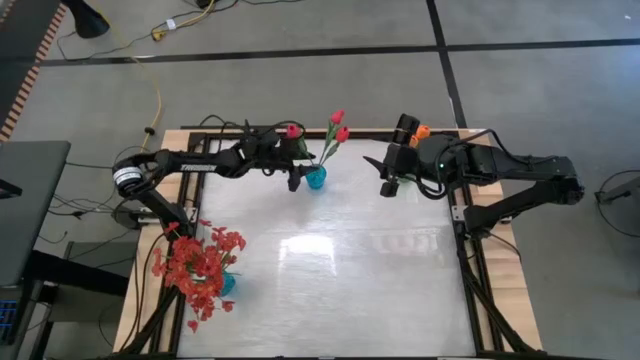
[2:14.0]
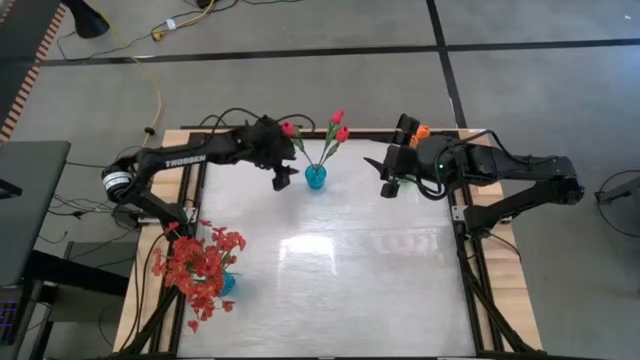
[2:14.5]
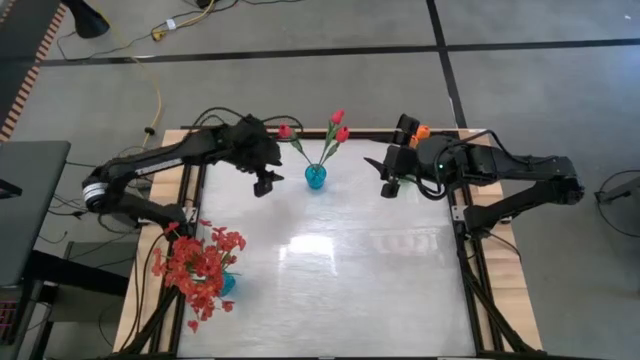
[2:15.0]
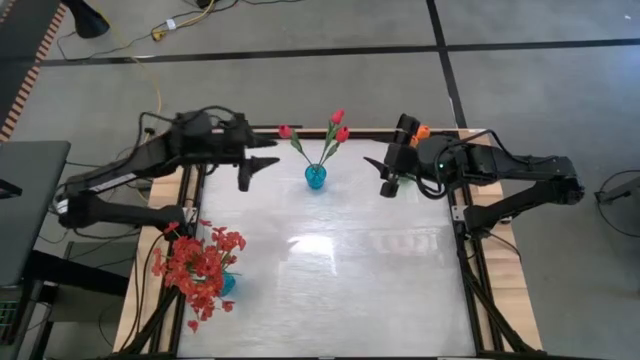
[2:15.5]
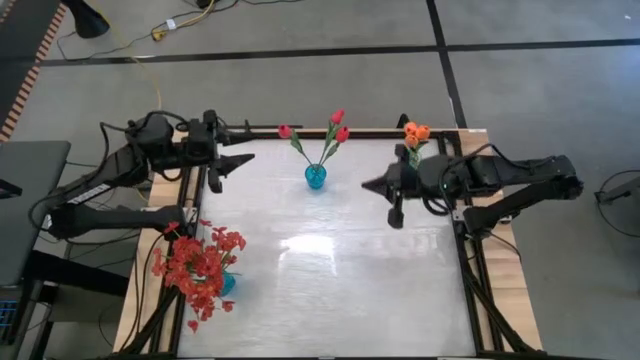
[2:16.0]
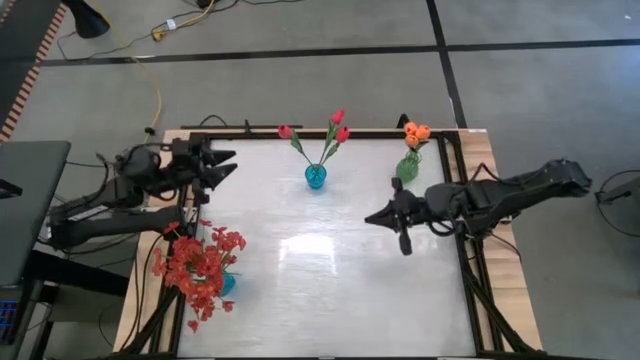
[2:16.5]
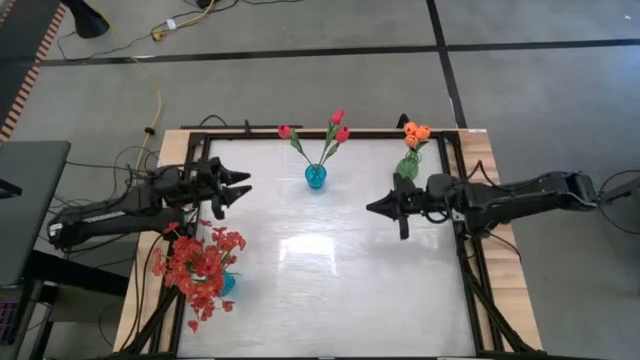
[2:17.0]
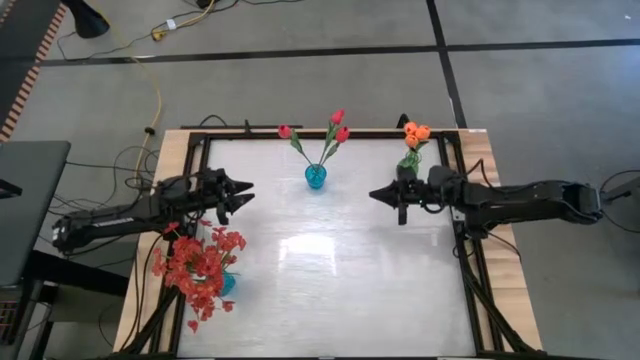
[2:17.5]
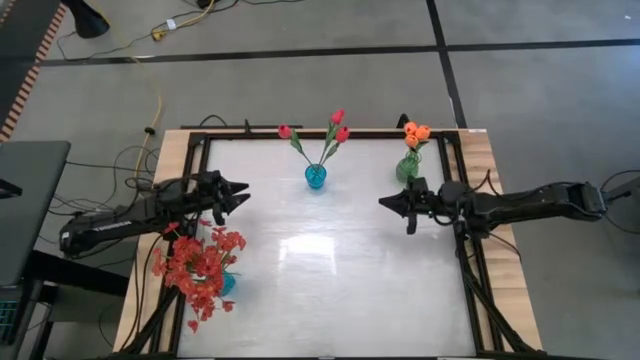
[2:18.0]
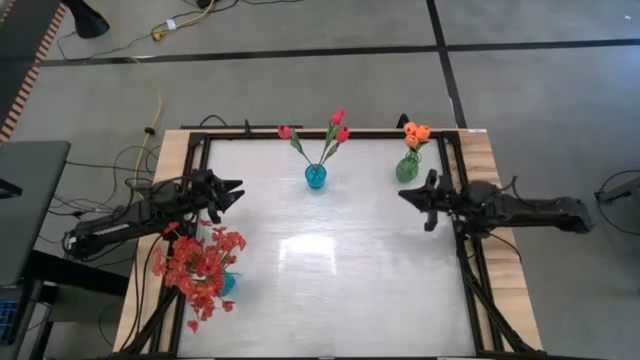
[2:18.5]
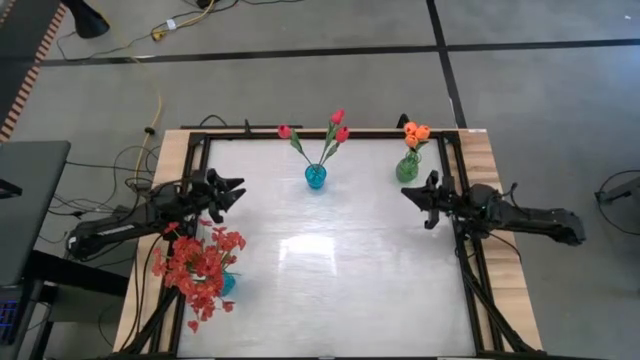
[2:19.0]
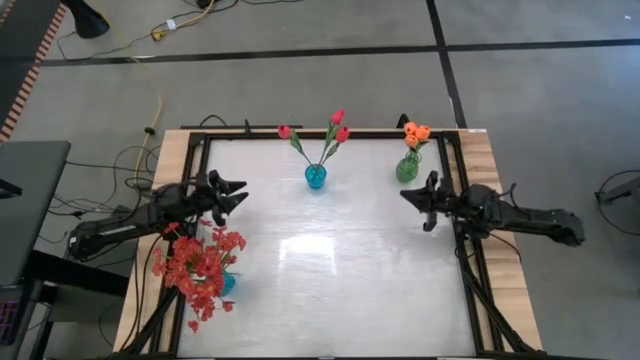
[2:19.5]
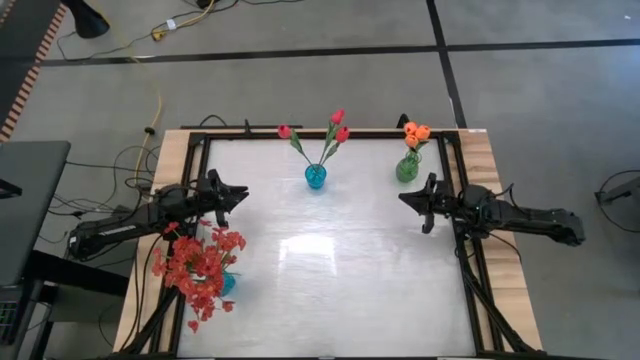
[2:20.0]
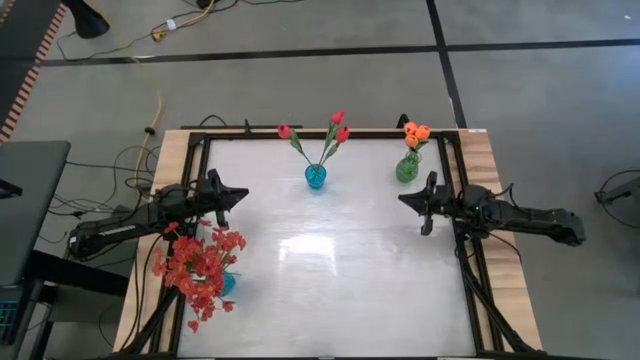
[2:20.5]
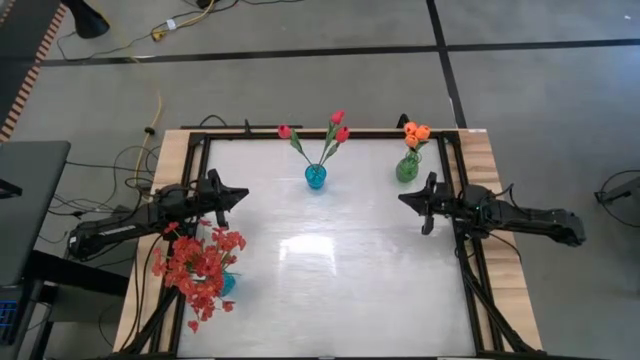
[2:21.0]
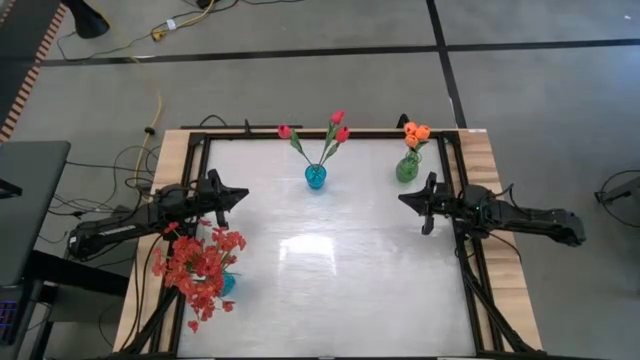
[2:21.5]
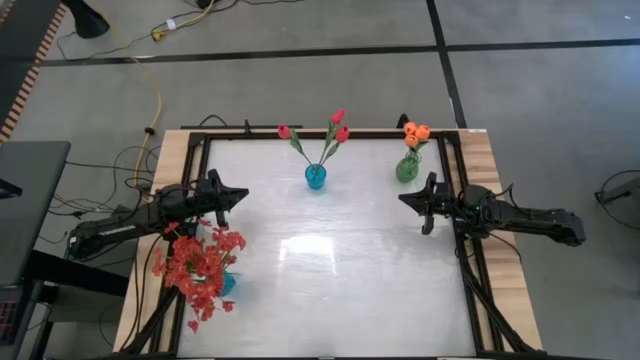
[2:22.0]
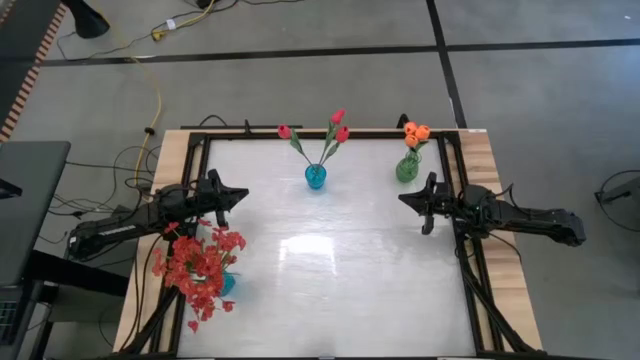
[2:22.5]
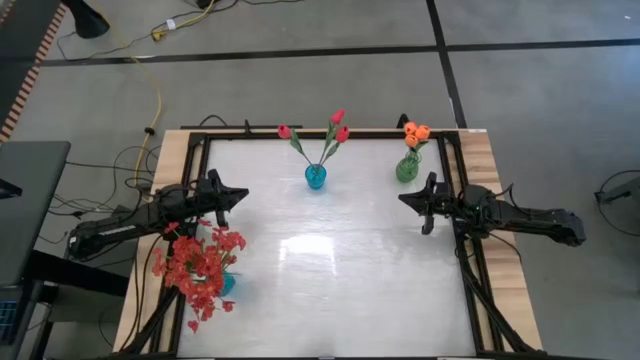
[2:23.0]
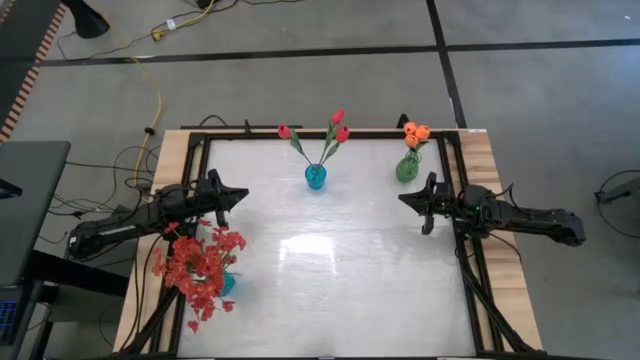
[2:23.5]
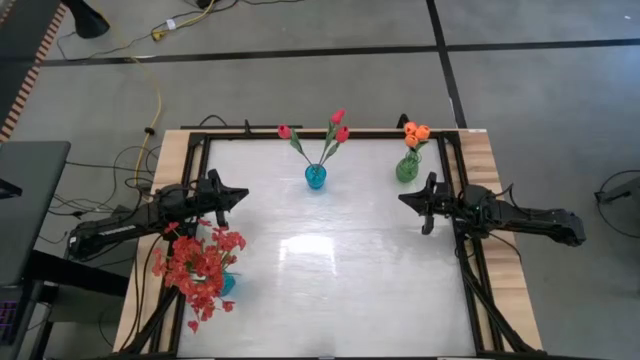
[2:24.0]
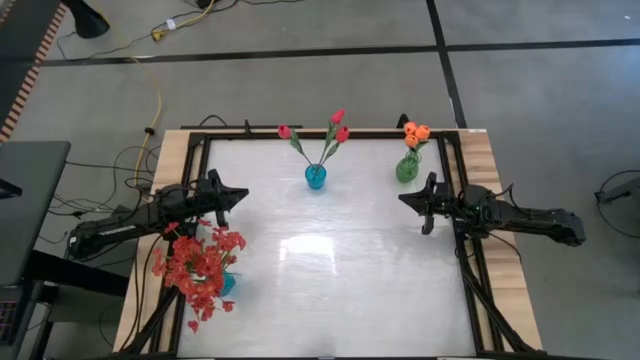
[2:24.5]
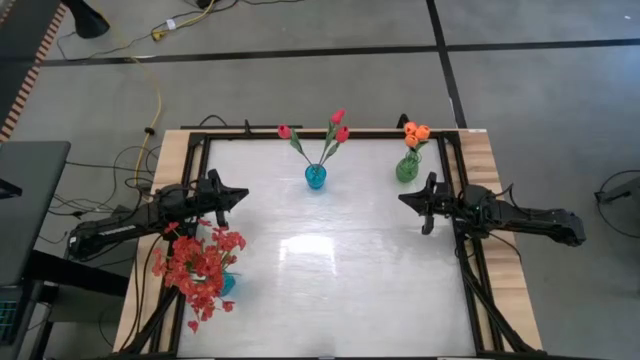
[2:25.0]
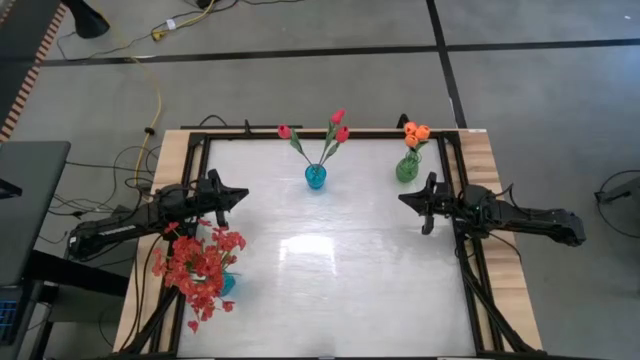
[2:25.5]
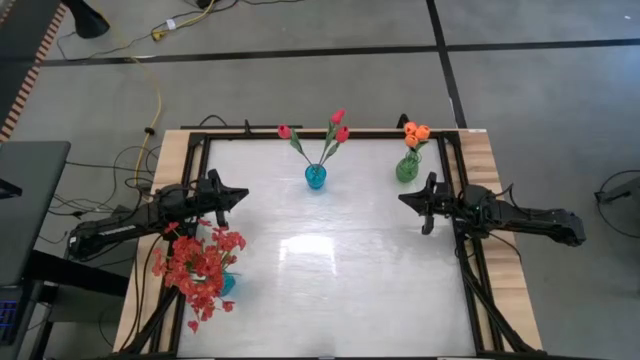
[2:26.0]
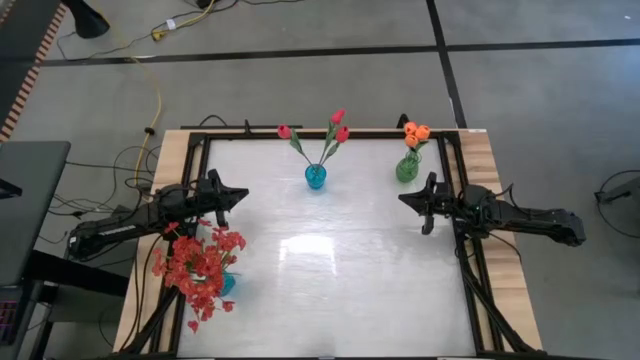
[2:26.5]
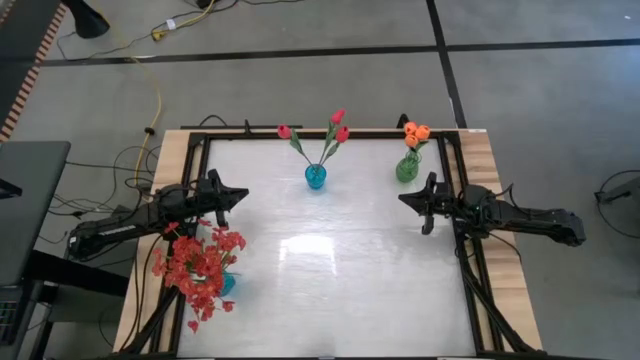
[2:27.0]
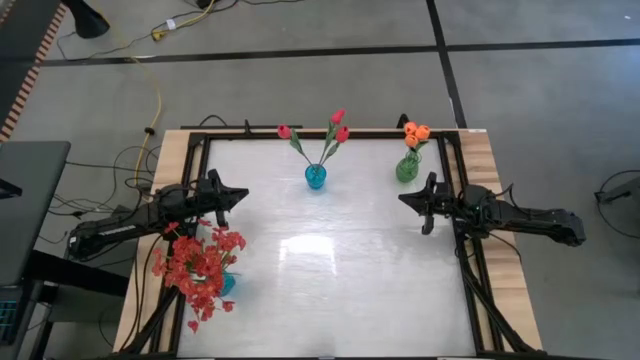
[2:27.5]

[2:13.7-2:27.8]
Task: Sort flowers into vase by color
Return to Home Position

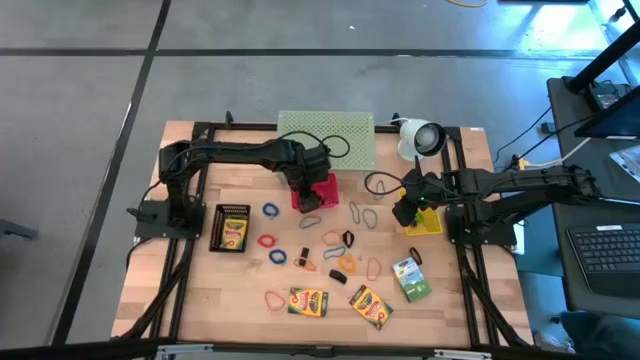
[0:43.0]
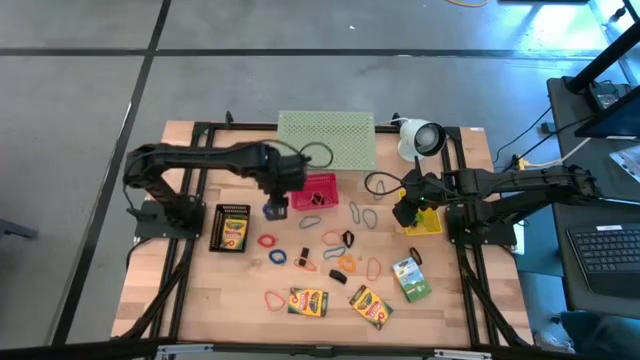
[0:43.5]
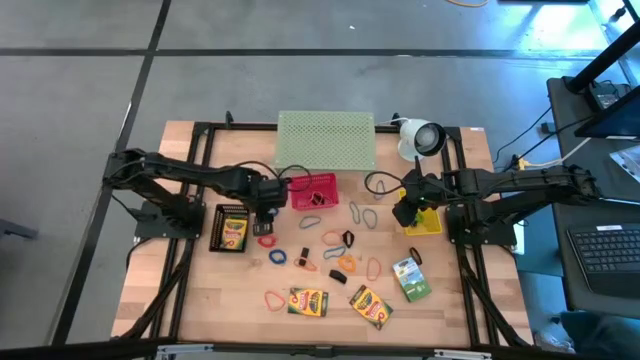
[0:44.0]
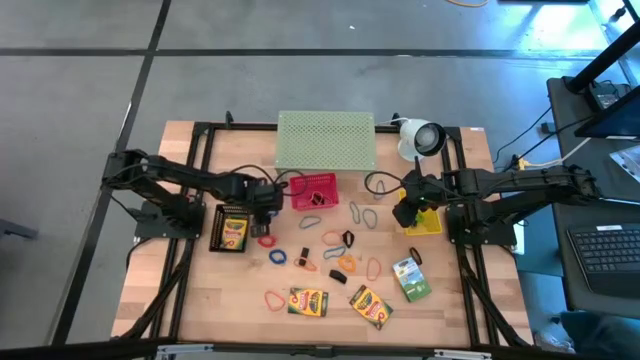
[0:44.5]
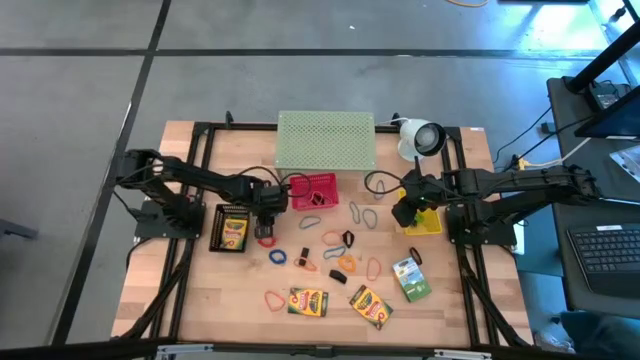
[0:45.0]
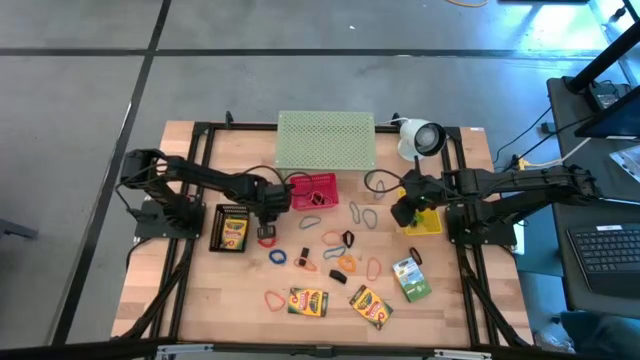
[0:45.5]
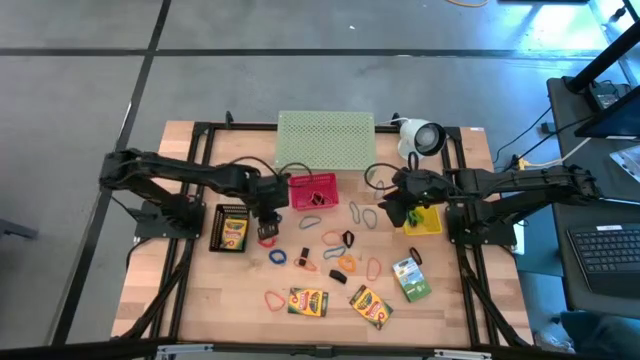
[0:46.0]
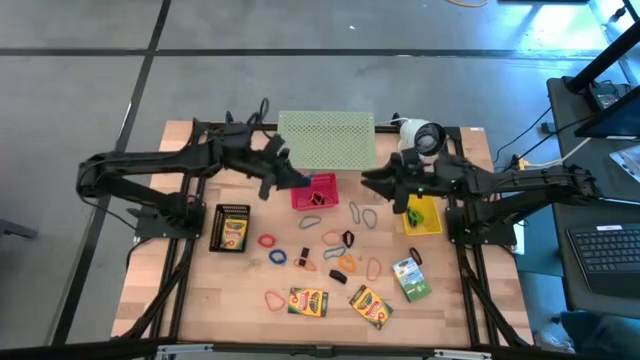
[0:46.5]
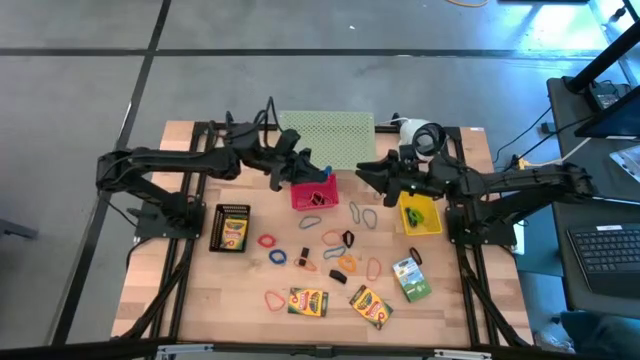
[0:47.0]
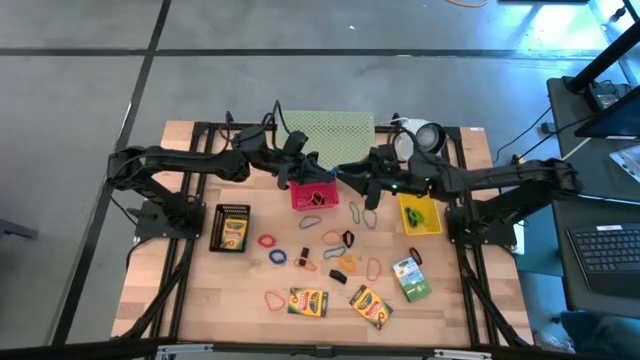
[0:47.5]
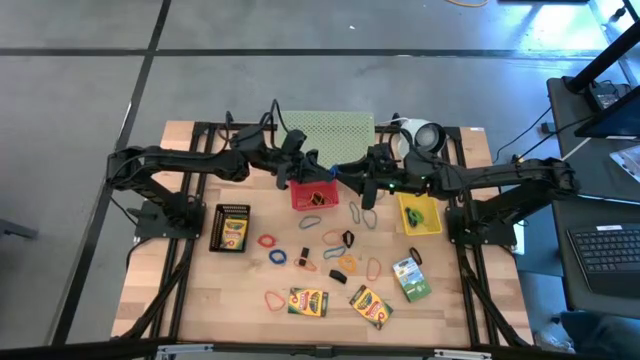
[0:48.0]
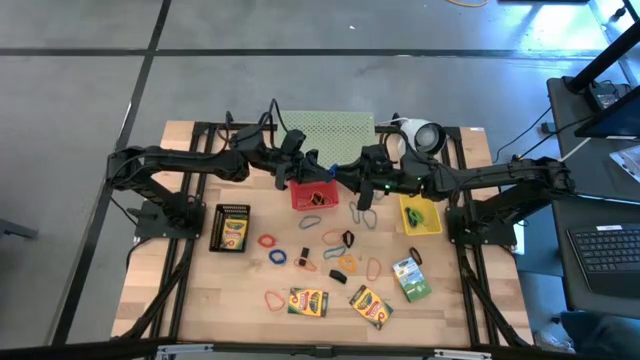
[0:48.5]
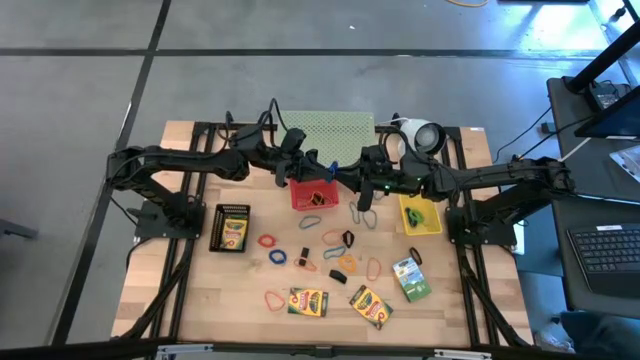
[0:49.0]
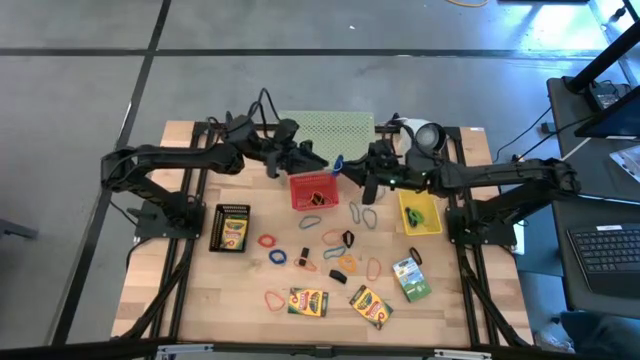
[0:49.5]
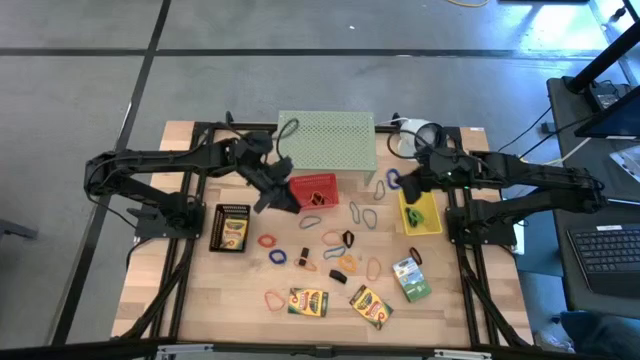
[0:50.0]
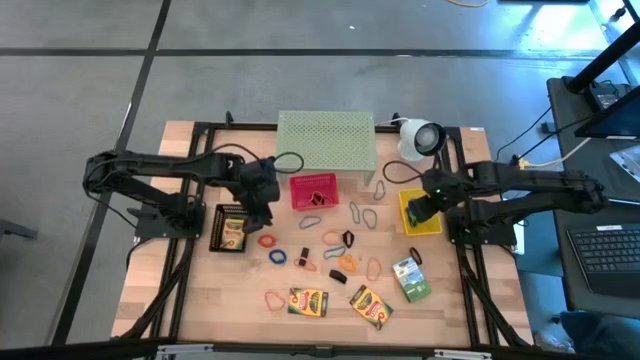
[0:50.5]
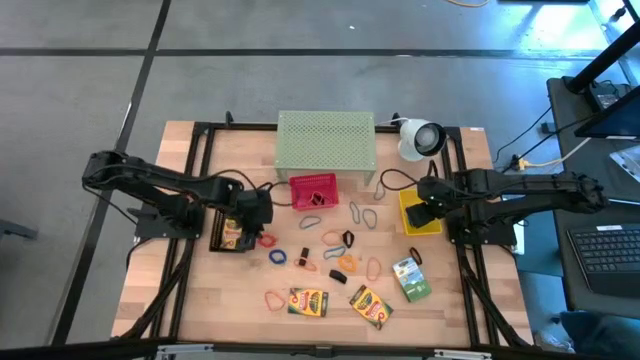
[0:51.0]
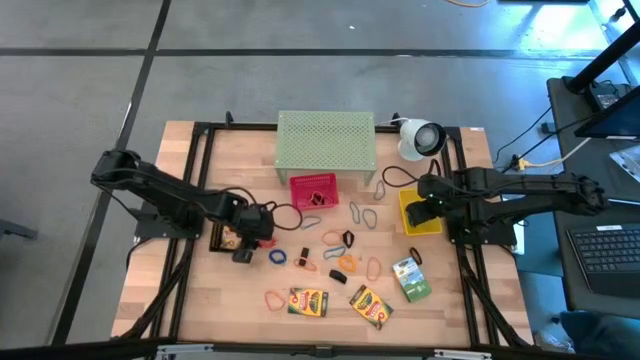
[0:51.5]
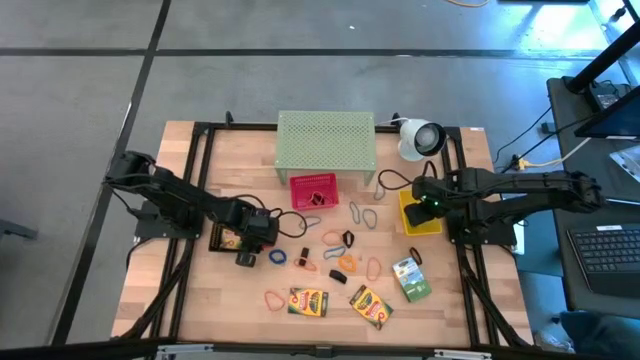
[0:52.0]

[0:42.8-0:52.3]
Task: Pick & Place Office Desk Supplies
Put the blue spring keychain into the yellow bin
